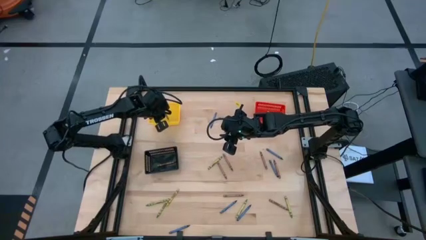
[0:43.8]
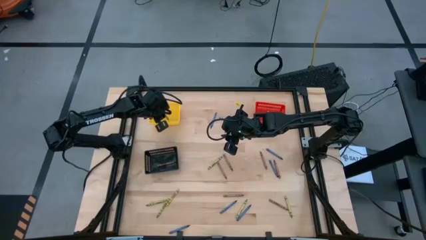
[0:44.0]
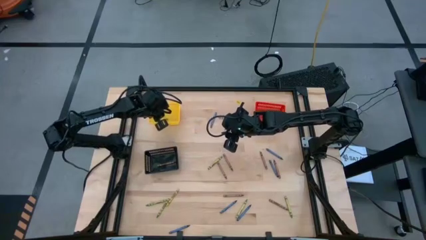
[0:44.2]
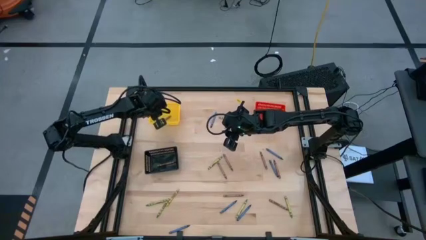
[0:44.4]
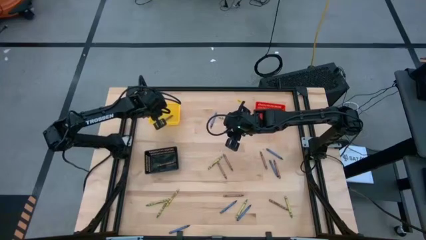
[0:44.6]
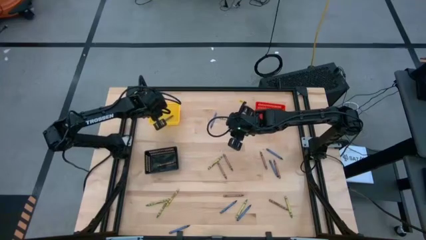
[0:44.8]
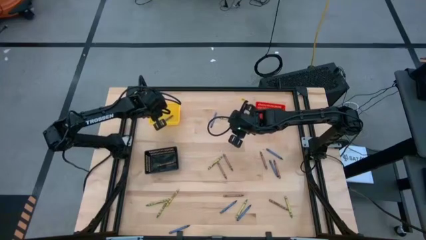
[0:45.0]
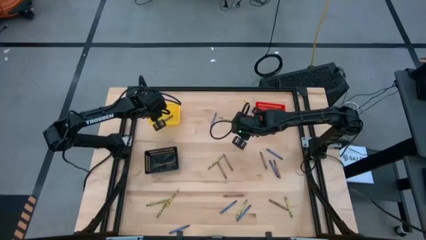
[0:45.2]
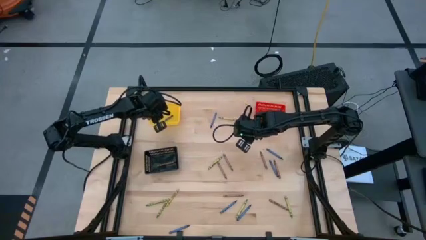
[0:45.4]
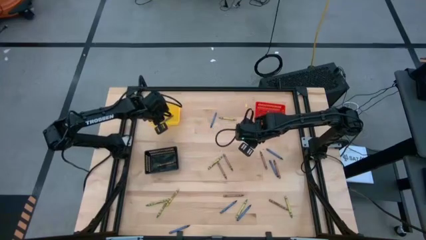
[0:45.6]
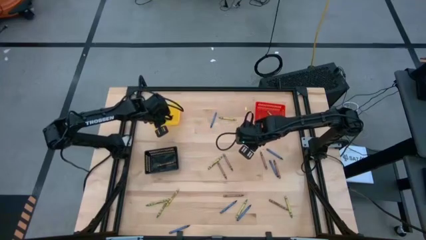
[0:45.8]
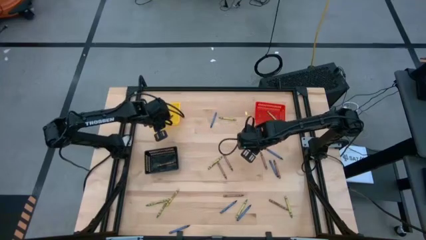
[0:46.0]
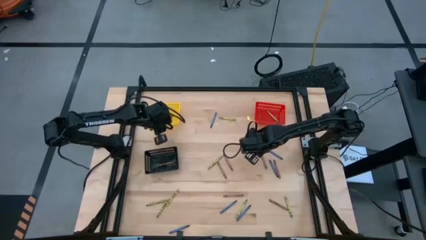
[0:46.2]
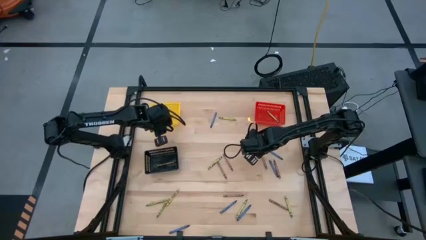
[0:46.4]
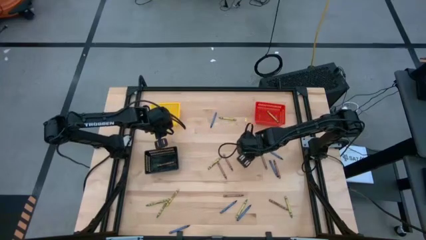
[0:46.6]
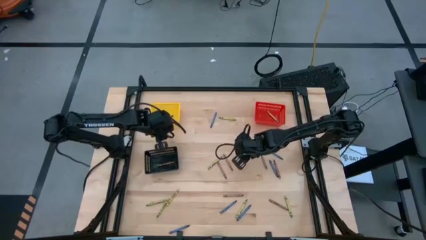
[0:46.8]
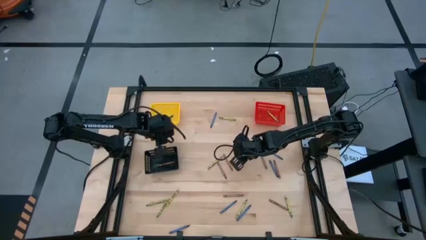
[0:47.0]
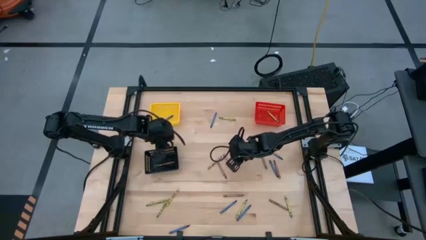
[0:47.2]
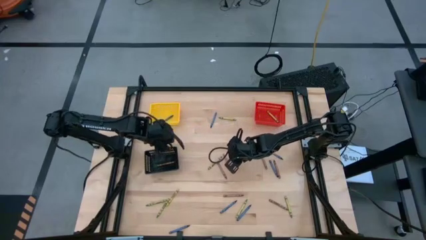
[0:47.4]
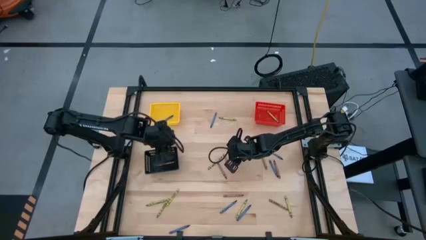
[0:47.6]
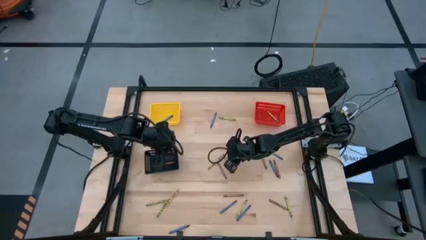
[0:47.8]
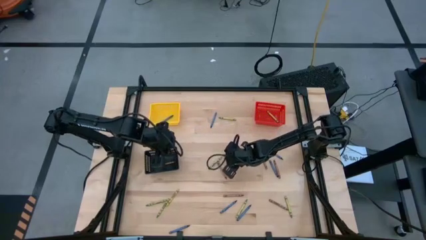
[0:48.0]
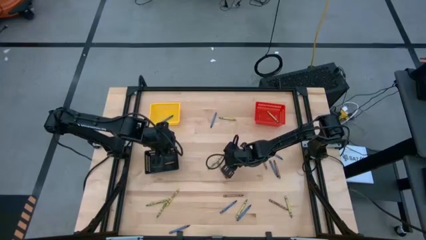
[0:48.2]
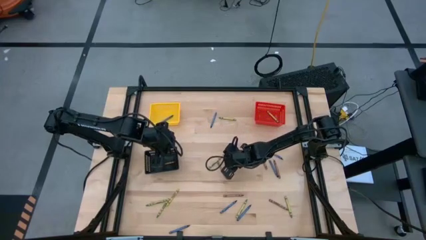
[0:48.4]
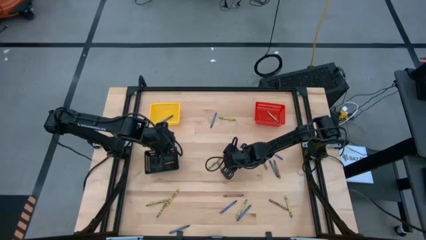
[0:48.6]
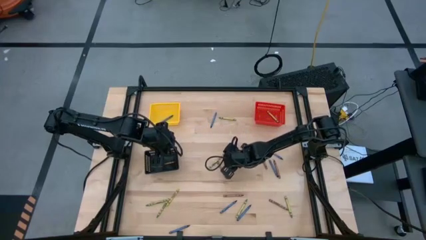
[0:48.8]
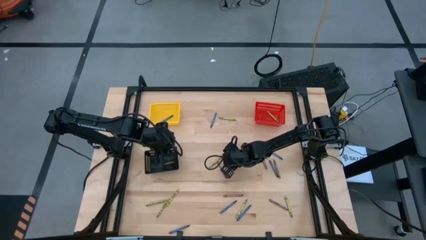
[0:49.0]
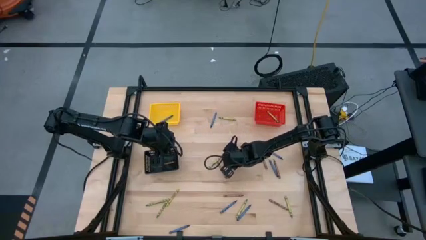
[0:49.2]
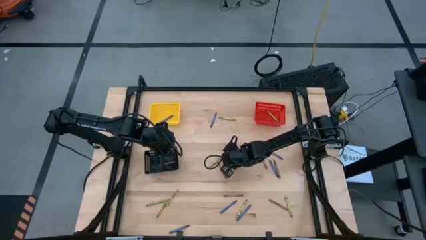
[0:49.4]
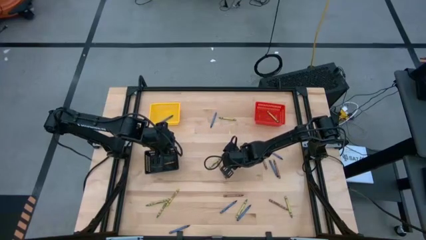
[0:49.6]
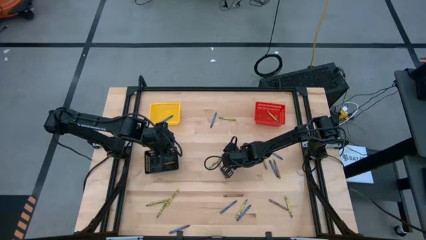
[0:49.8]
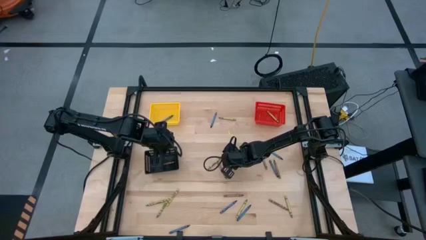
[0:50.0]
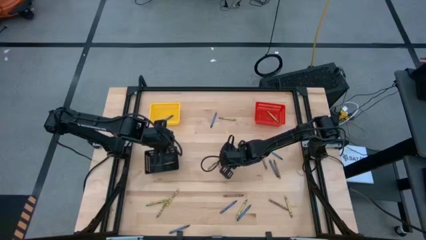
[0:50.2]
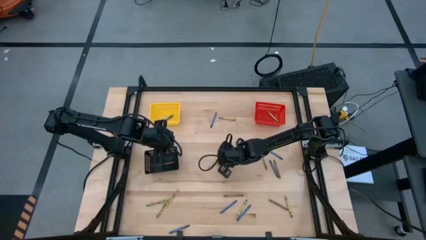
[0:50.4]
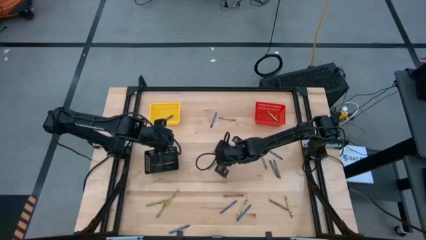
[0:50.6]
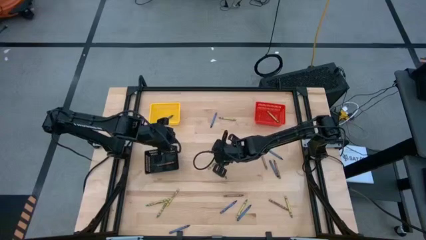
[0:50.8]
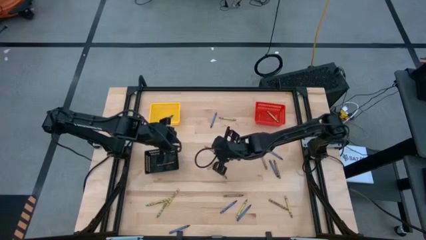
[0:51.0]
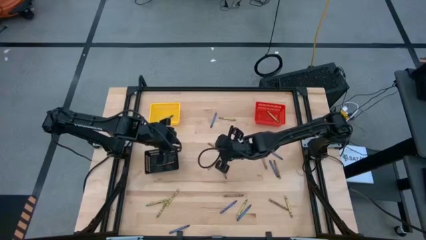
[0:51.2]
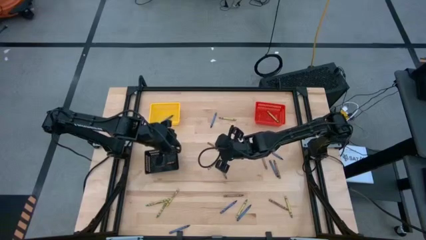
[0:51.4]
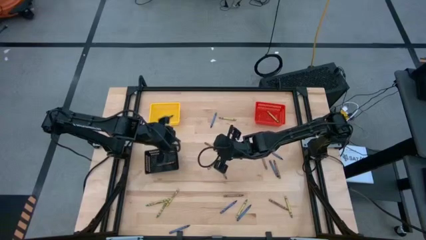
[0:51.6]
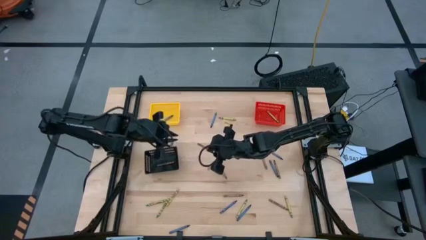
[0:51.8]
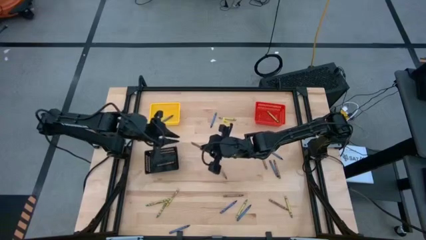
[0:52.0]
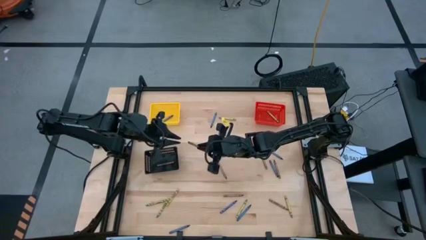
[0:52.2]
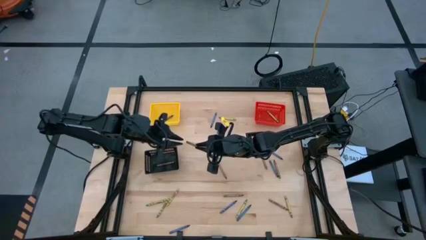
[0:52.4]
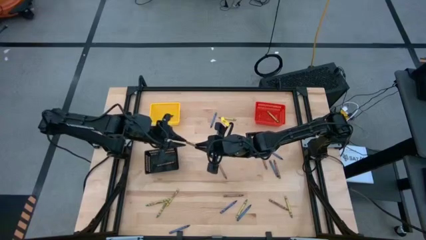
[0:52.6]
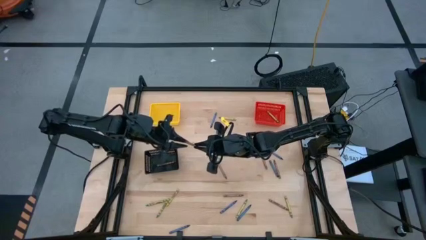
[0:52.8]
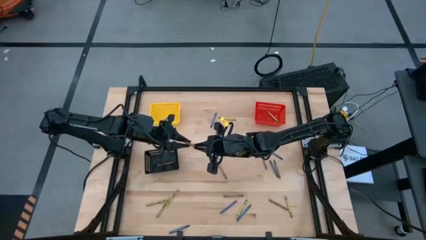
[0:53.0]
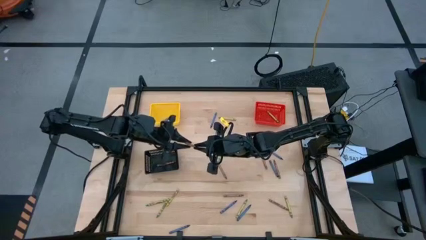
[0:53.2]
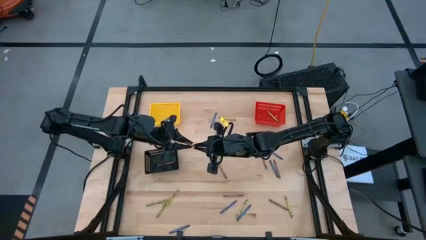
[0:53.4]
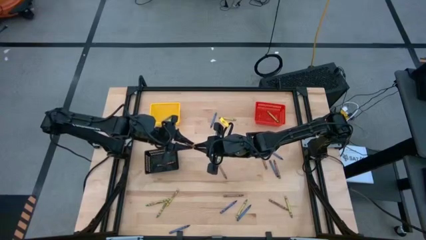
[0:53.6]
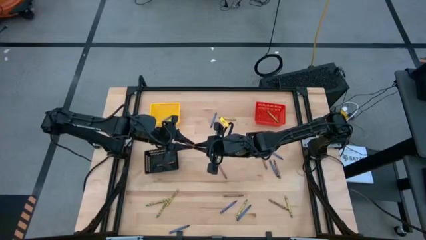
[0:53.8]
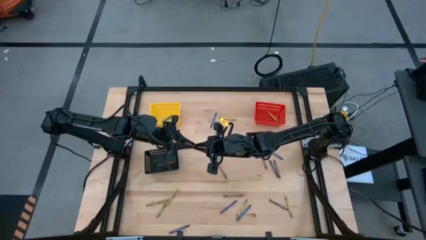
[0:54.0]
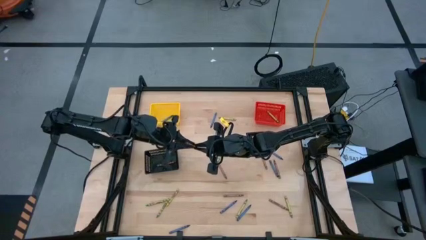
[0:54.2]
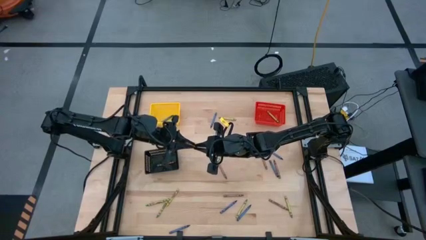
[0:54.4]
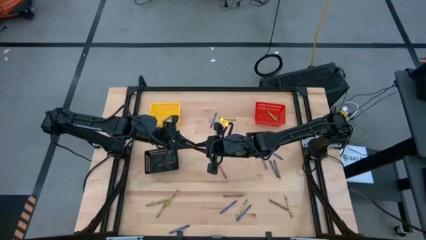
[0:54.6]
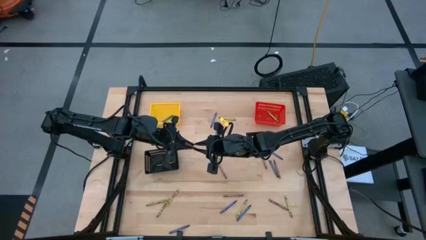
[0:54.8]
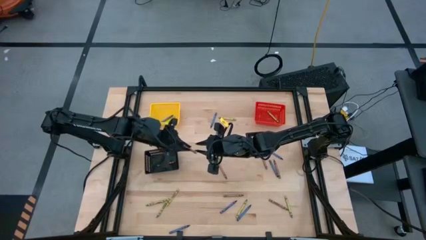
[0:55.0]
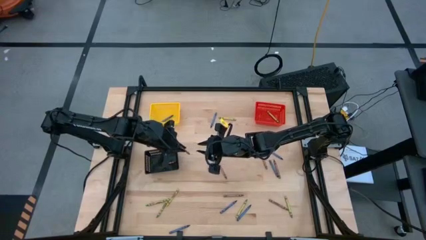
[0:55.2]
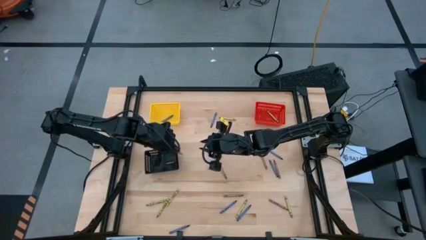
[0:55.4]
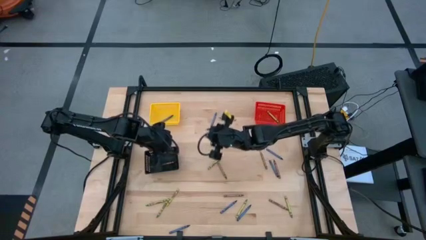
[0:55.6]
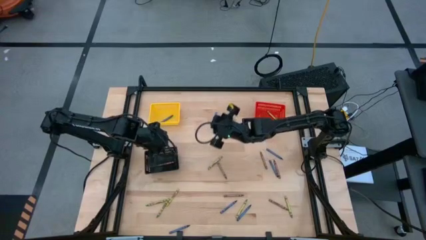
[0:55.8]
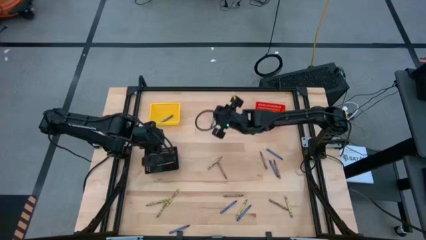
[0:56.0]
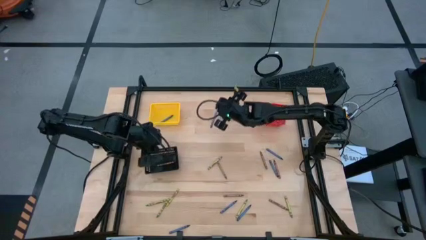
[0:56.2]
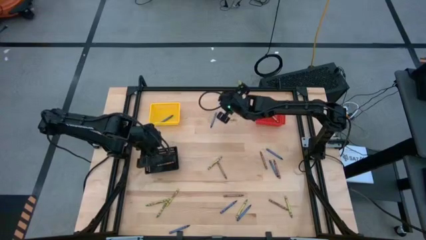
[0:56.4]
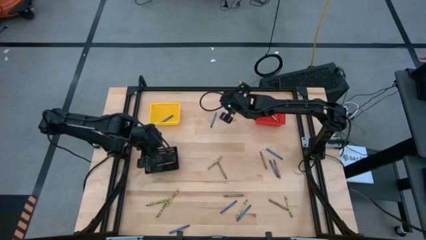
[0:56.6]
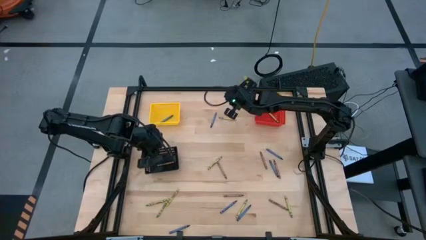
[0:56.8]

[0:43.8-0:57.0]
Task: Sort crayons
Put the brown crayon into the black bin
